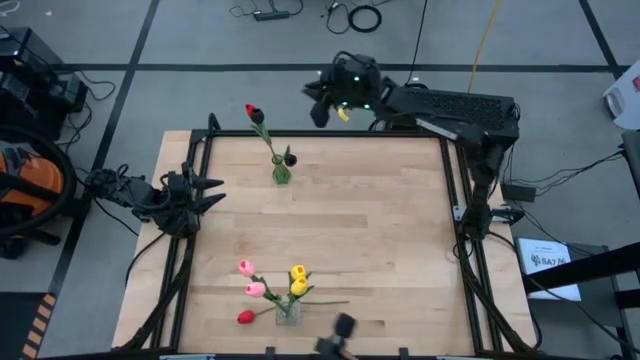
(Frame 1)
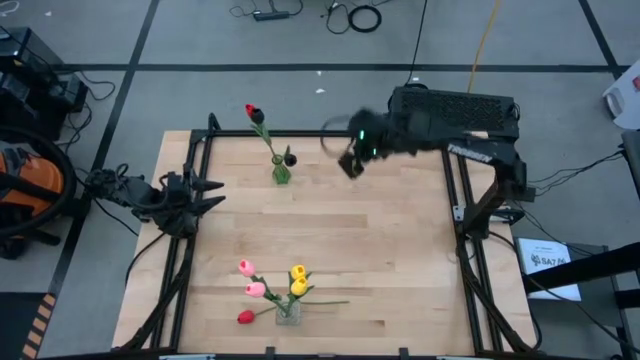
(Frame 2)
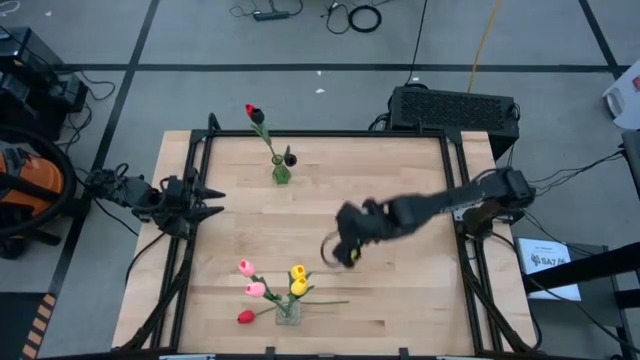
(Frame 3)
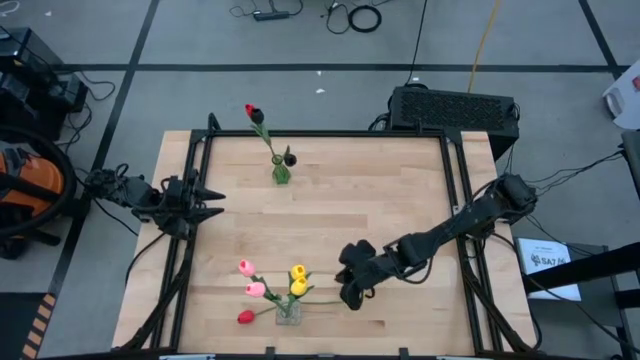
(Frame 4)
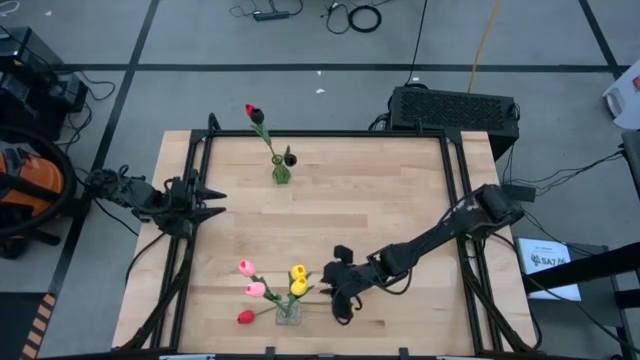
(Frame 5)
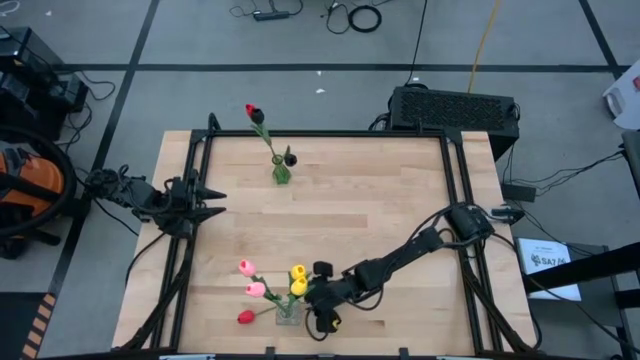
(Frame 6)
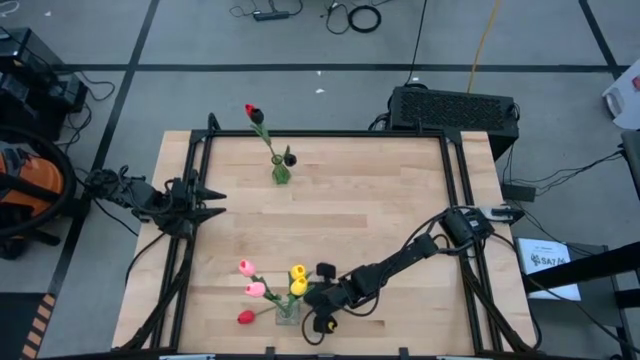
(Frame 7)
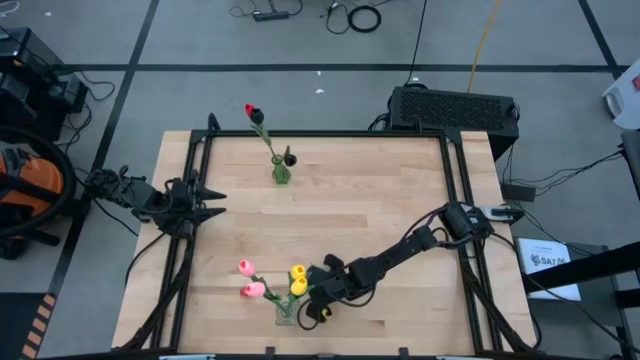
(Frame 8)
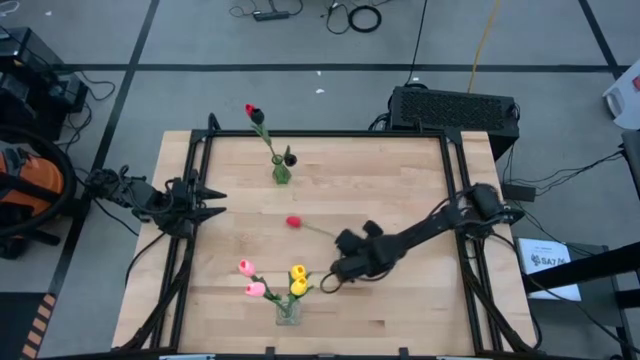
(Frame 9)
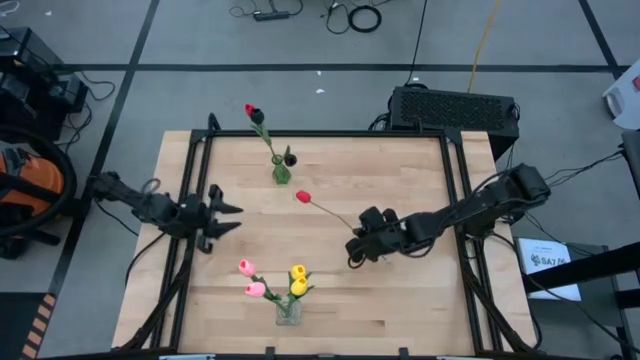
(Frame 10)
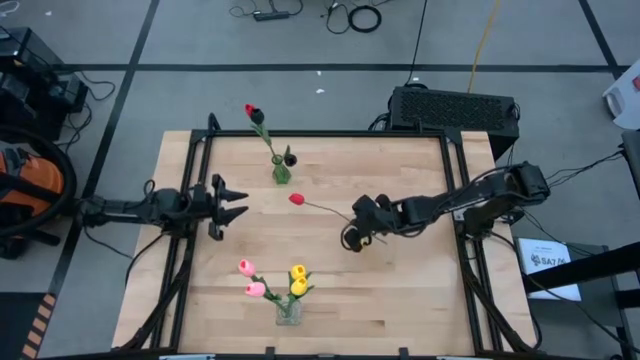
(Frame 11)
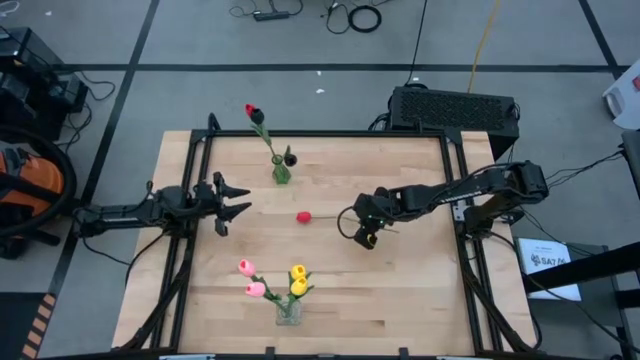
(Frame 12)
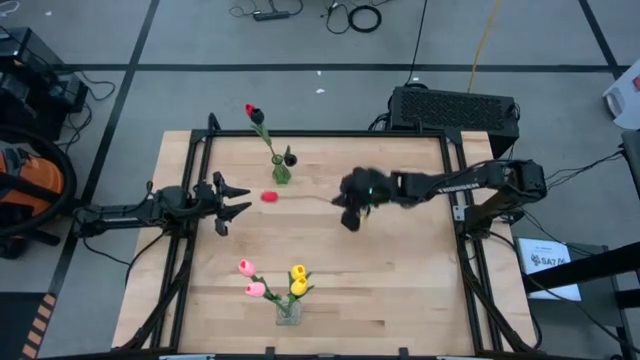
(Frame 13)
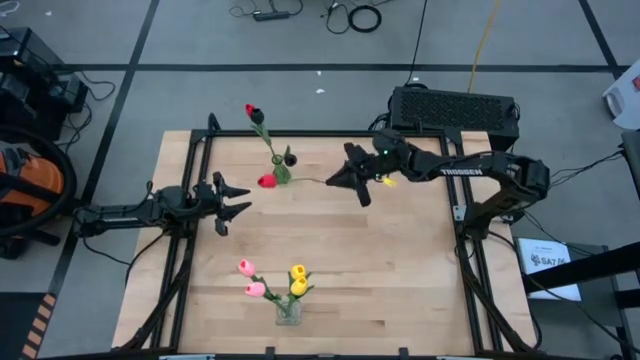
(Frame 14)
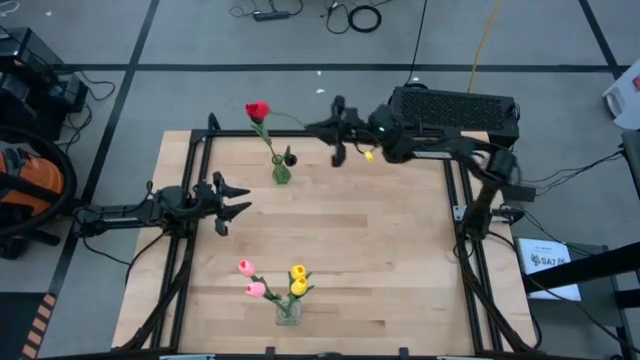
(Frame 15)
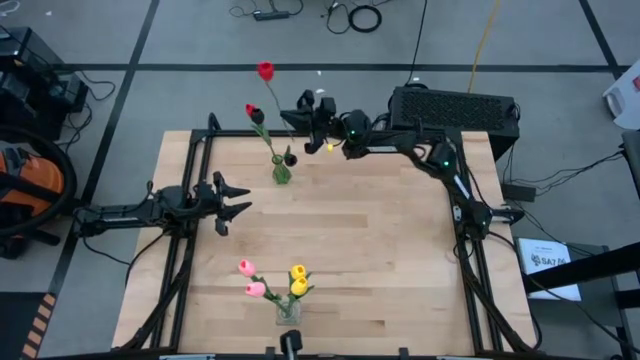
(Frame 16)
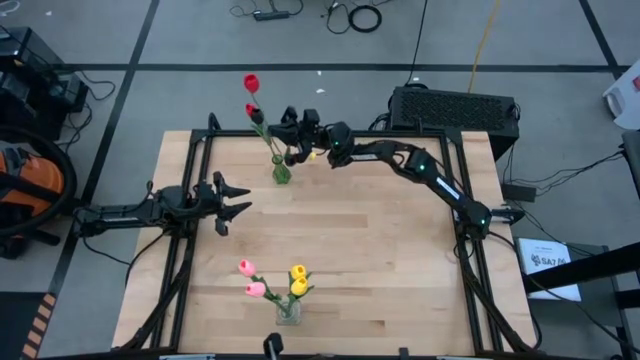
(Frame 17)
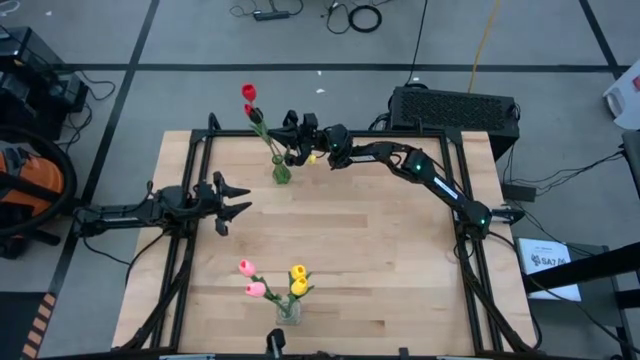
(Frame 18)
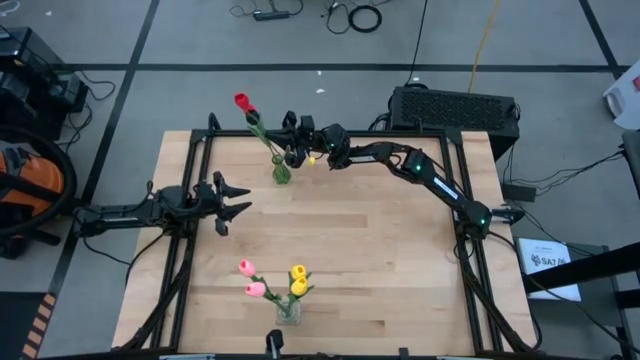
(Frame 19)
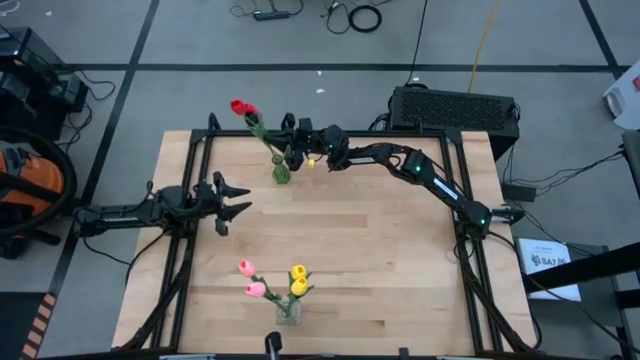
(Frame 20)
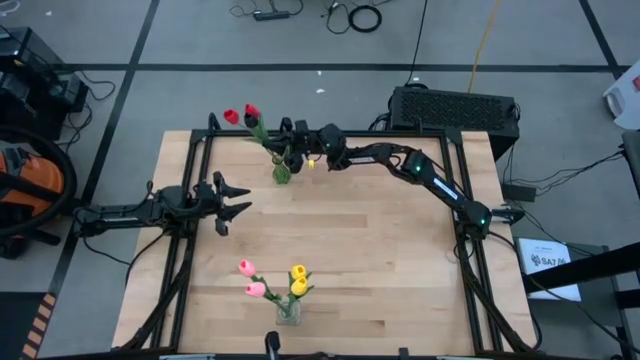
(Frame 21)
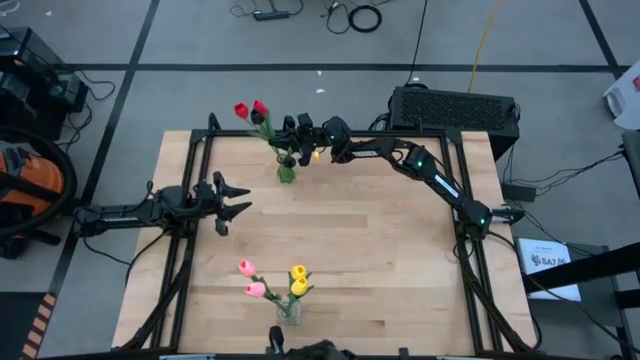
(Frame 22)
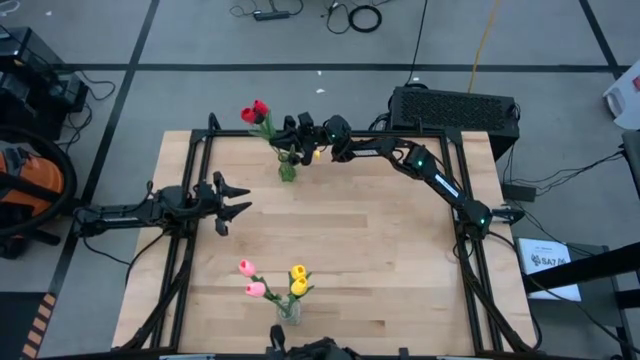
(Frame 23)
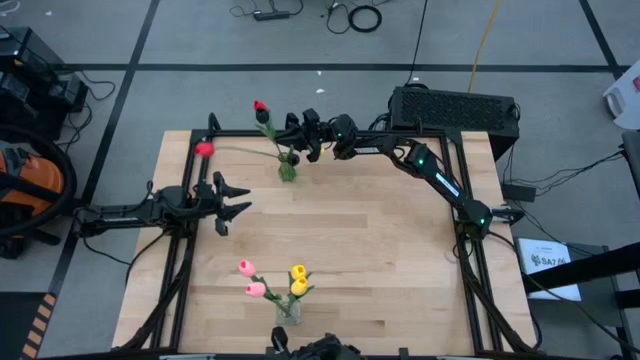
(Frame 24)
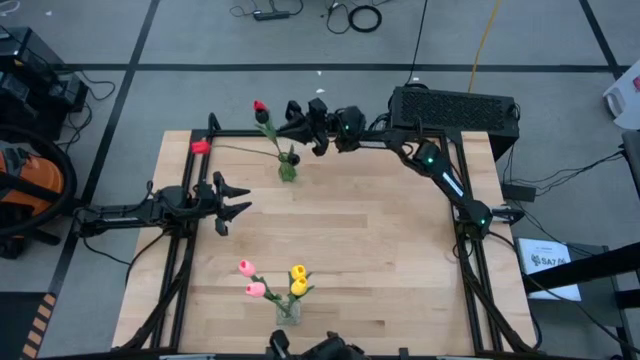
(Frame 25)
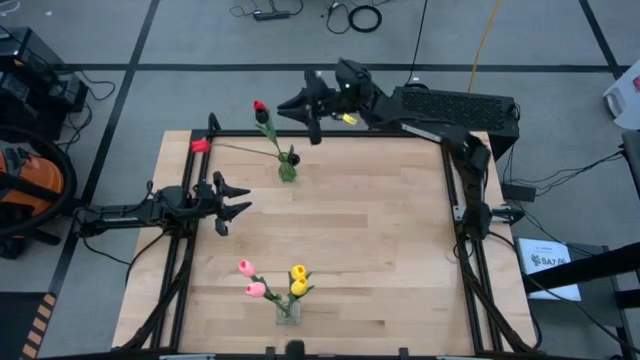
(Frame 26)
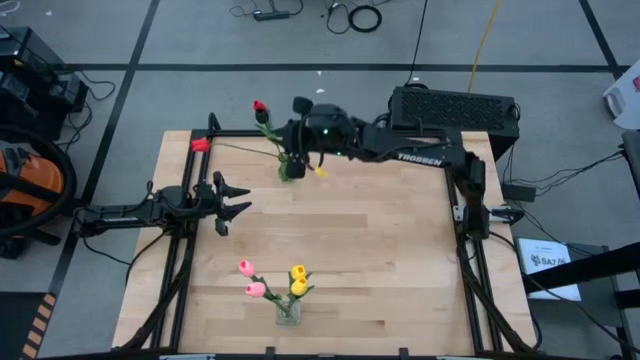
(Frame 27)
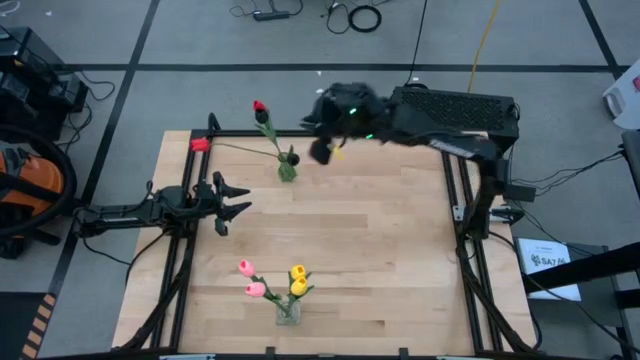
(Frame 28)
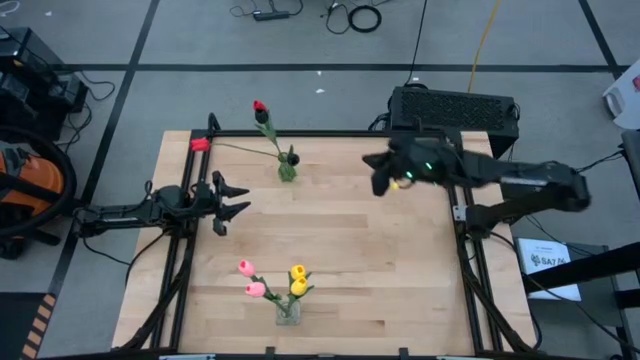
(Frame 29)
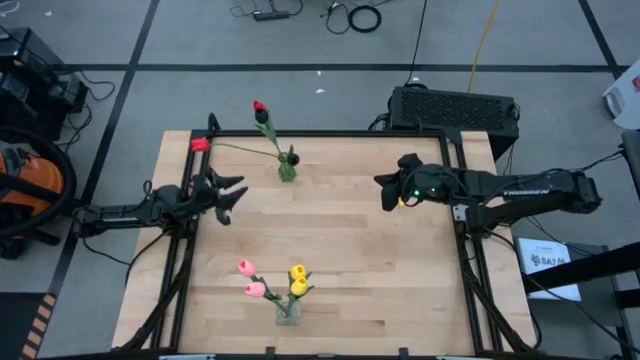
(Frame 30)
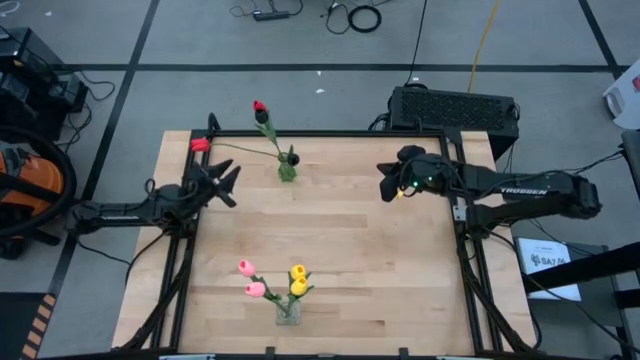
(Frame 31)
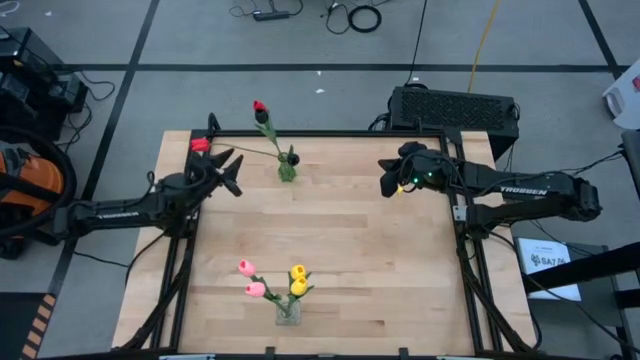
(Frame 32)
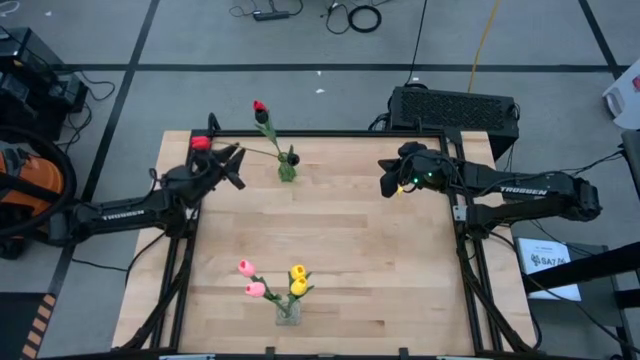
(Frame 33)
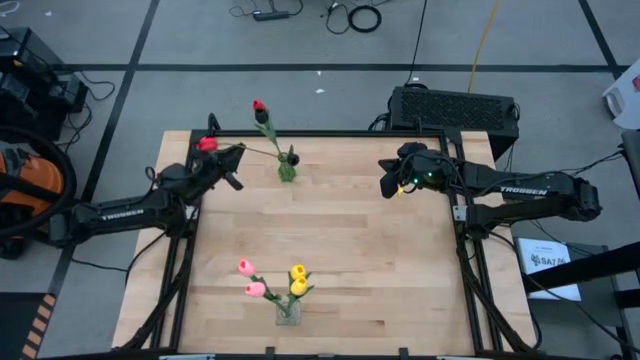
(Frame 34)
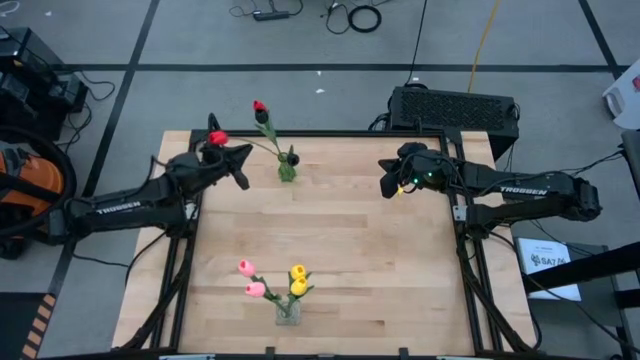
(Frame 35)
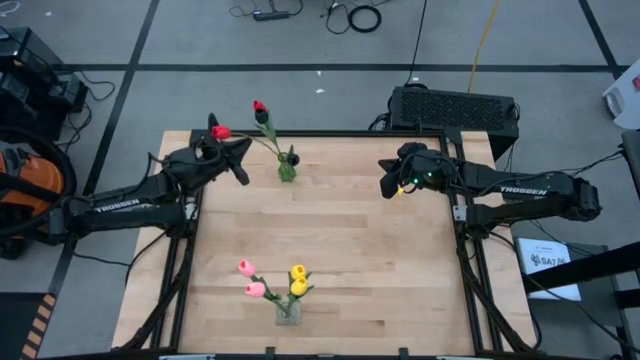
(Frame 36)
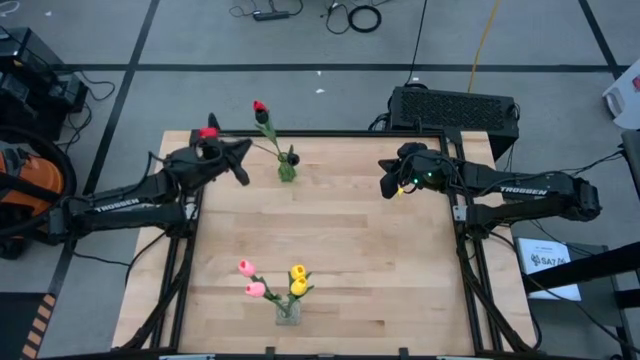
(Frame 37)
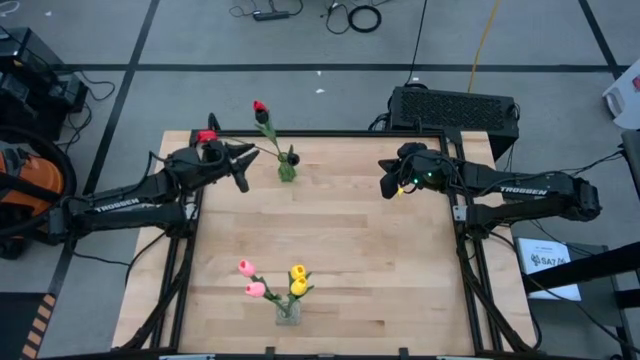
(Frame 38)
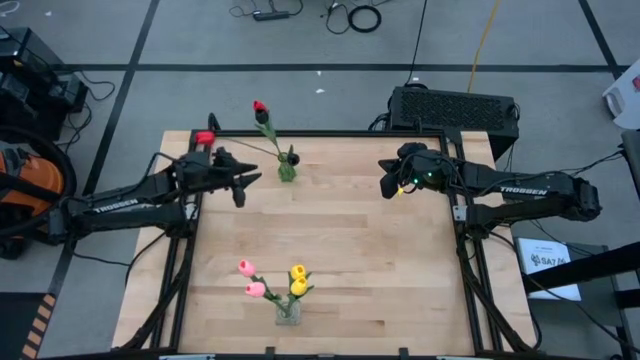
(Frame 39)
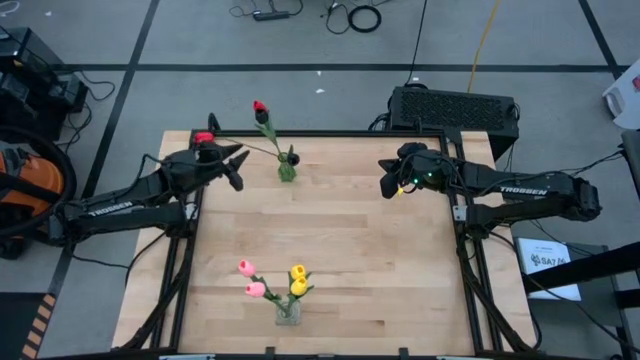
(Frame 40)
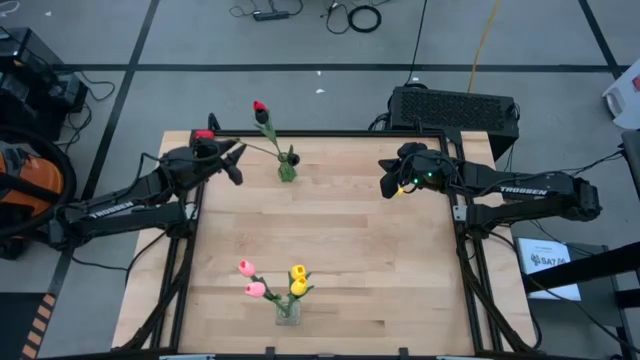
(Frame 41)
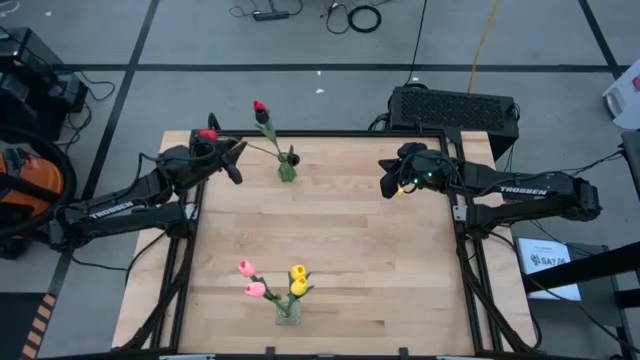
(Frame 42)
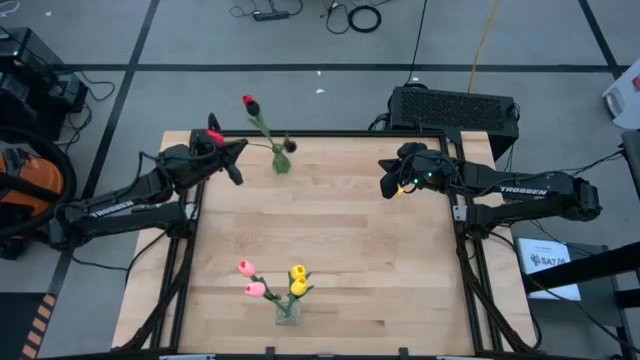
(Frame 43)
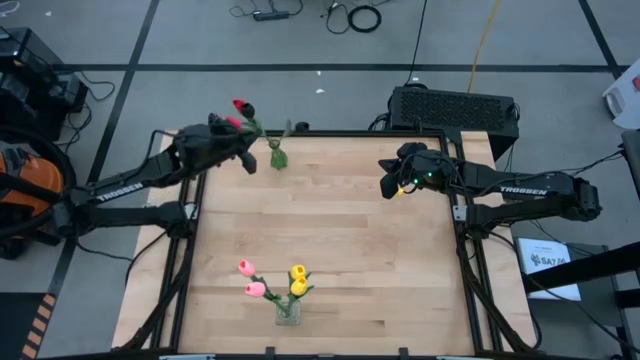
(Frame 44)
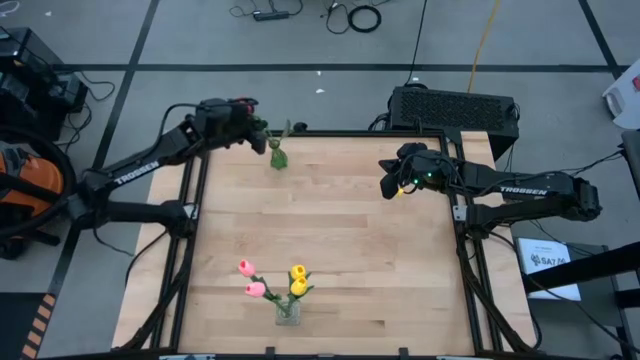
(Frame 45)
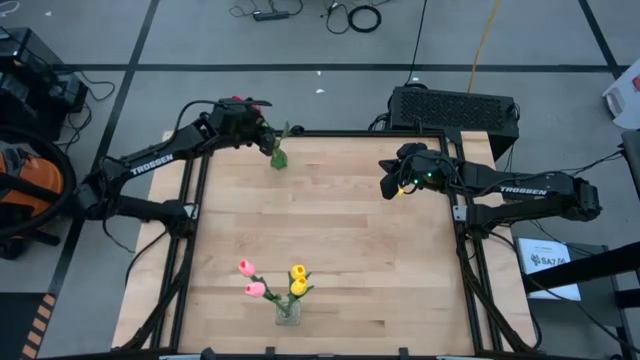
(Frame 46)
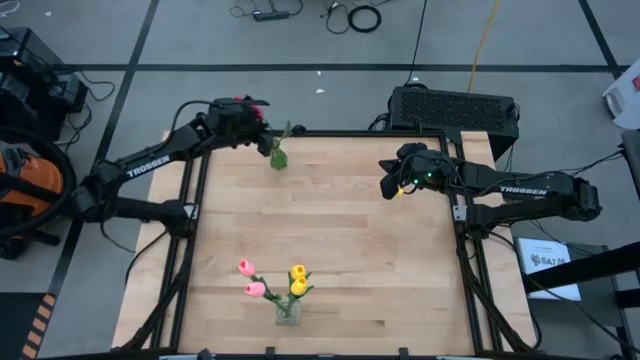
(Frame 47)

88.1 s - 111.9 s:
Task: Sort flowers into vase by color
Put the red flower into the green vase
